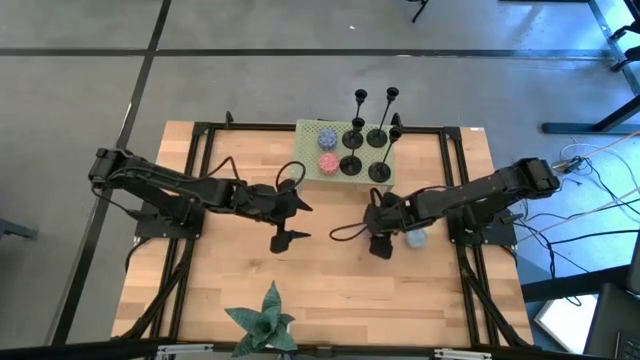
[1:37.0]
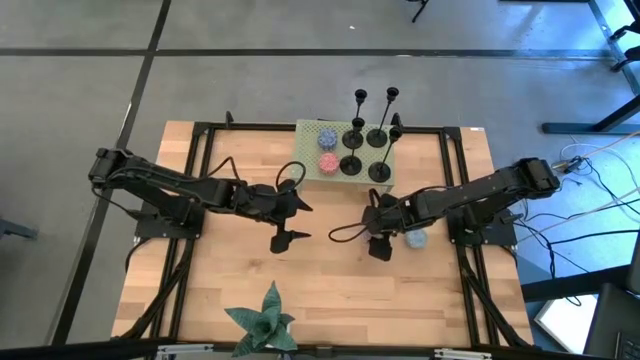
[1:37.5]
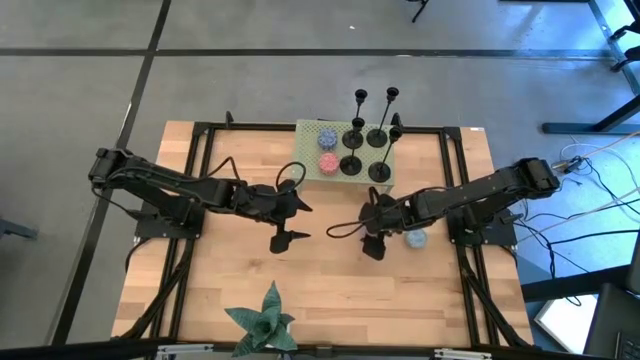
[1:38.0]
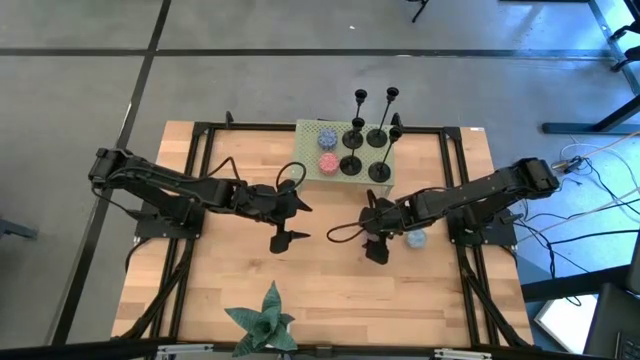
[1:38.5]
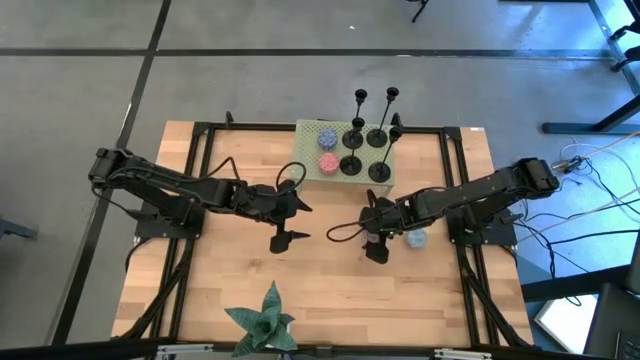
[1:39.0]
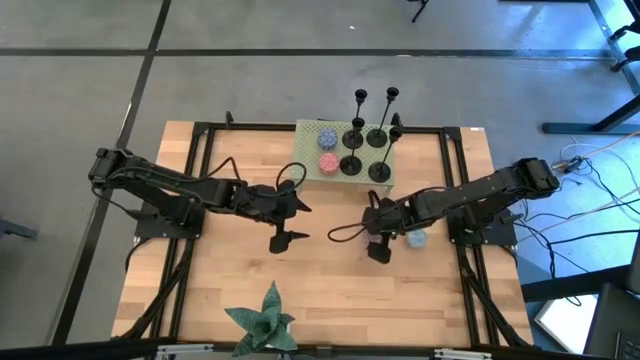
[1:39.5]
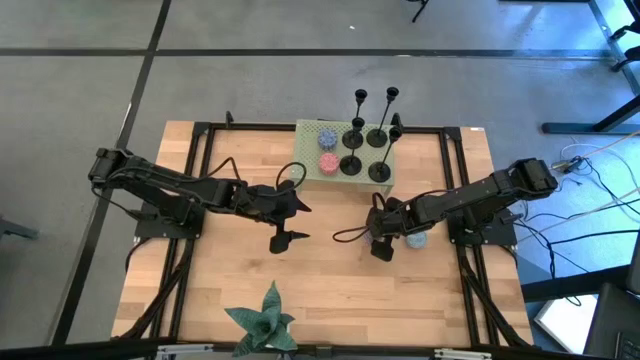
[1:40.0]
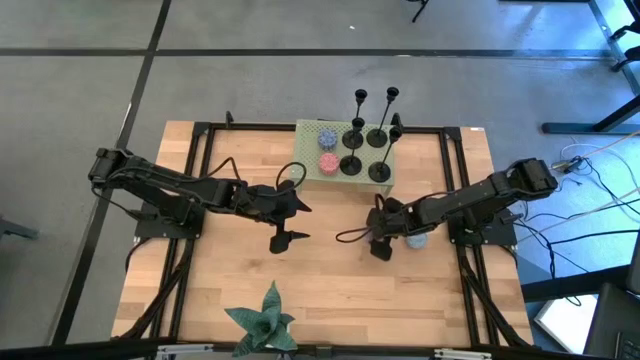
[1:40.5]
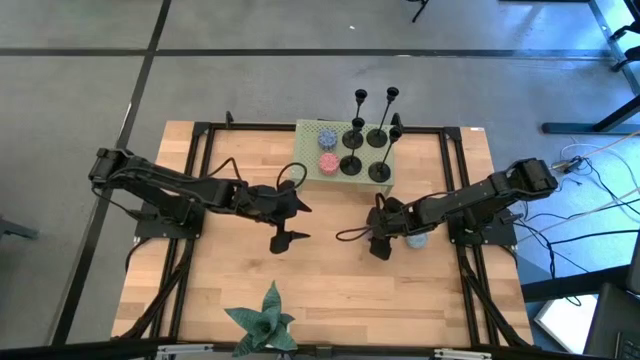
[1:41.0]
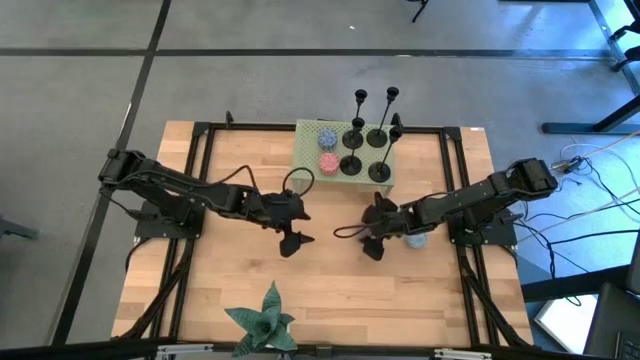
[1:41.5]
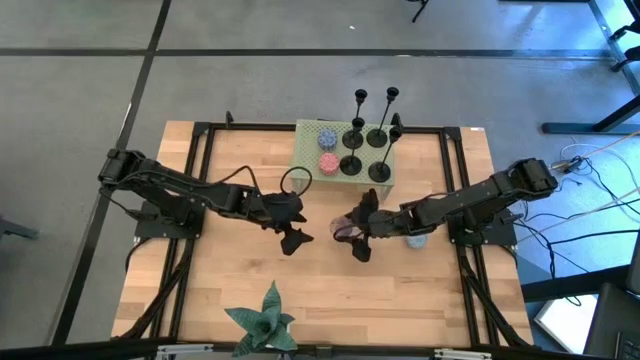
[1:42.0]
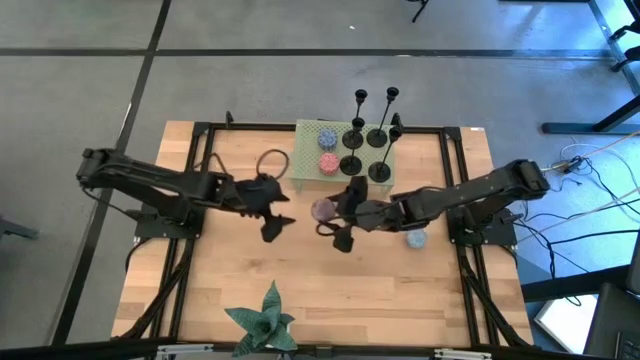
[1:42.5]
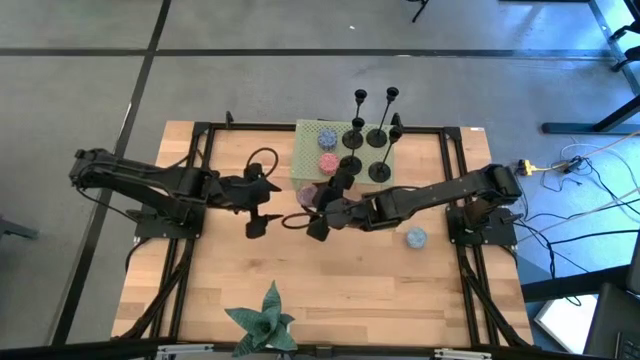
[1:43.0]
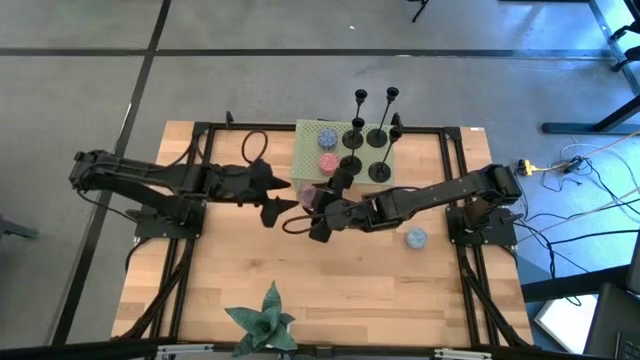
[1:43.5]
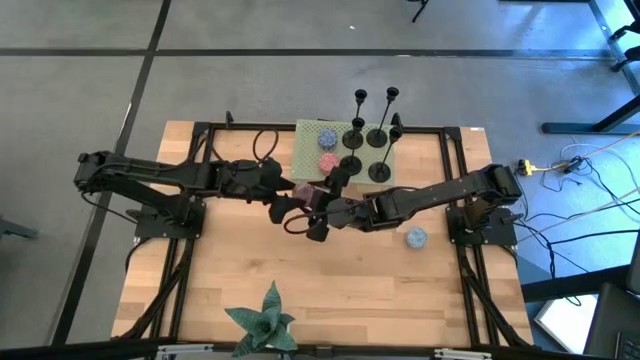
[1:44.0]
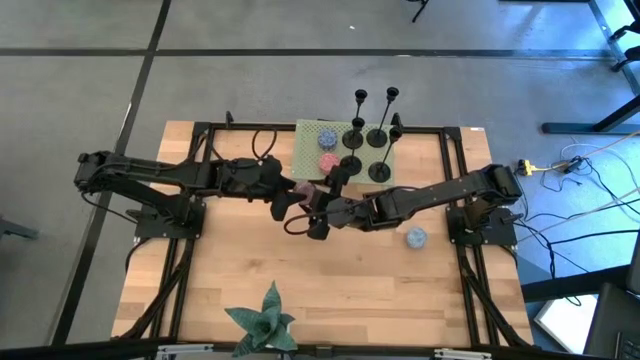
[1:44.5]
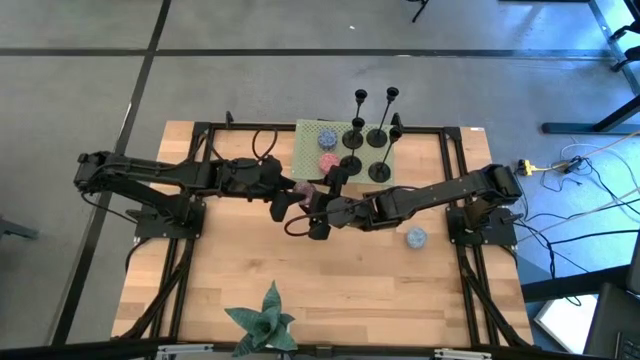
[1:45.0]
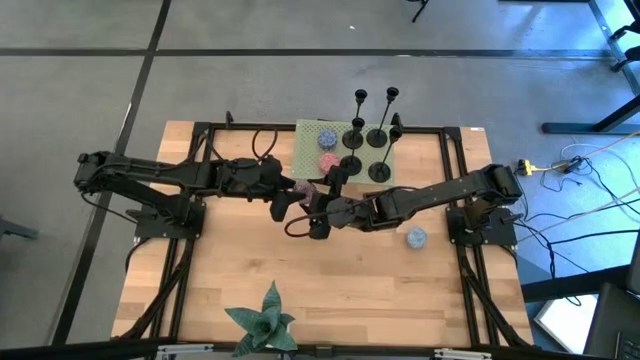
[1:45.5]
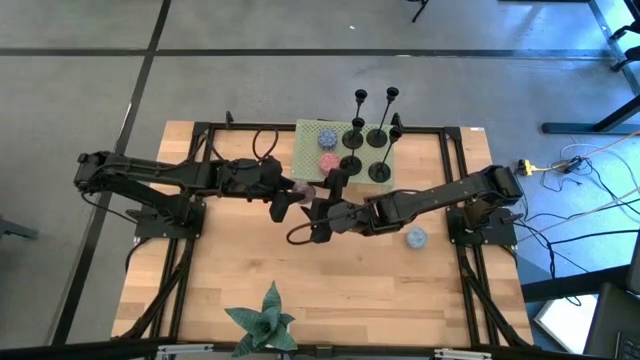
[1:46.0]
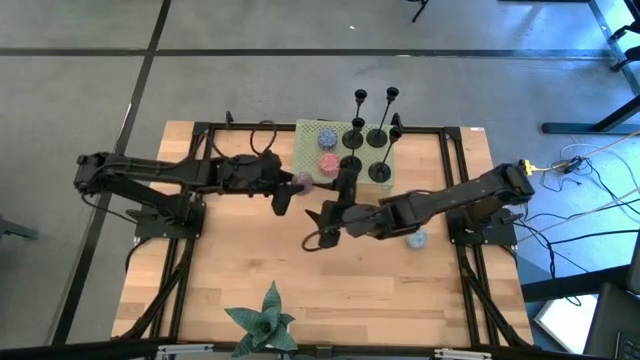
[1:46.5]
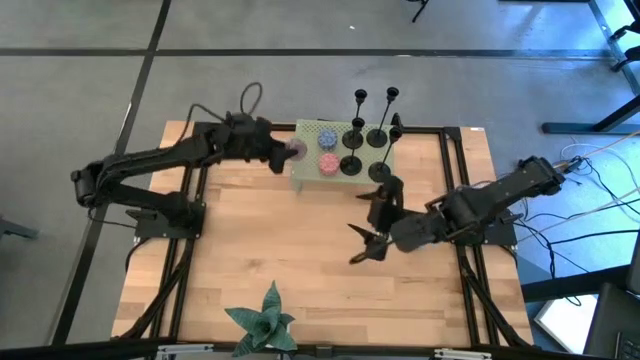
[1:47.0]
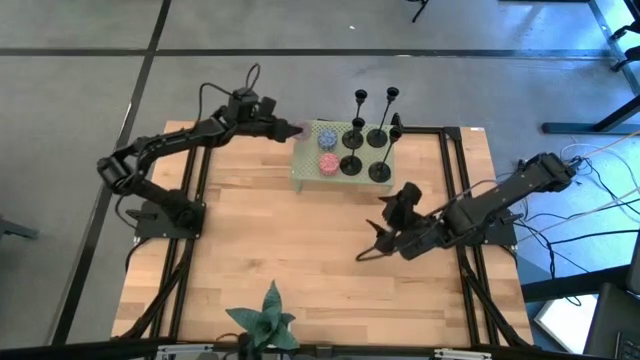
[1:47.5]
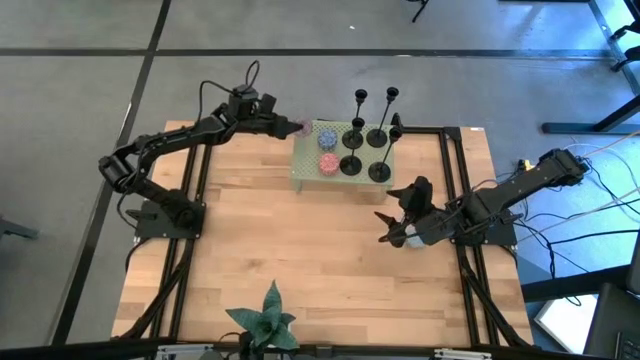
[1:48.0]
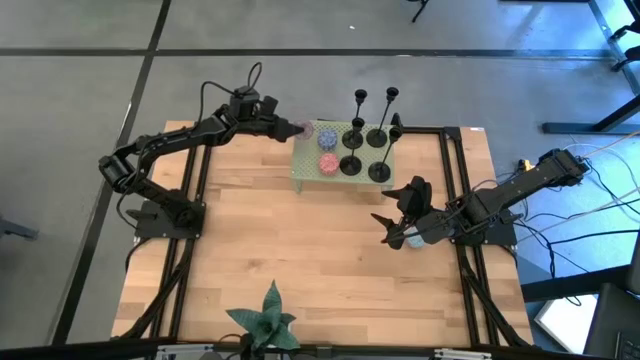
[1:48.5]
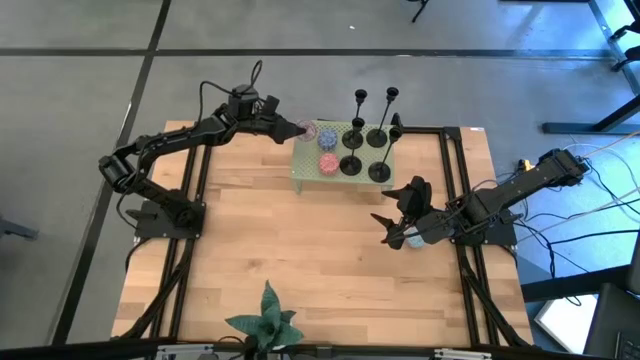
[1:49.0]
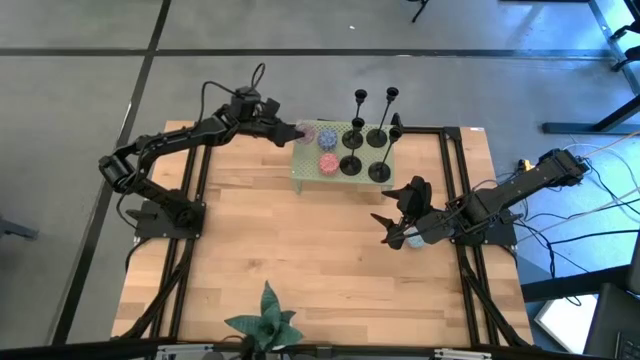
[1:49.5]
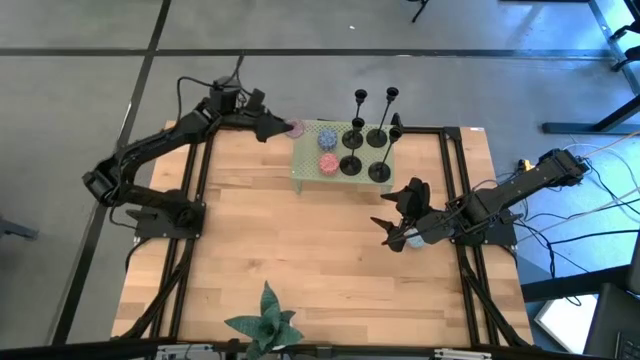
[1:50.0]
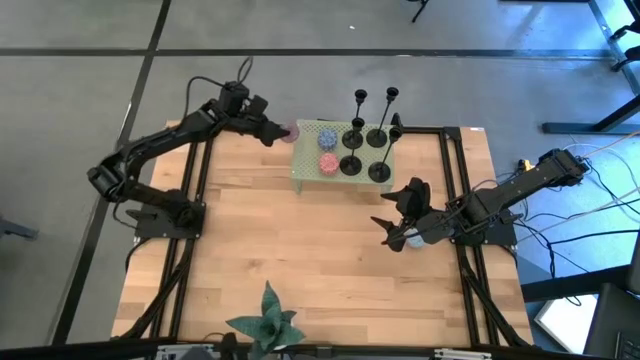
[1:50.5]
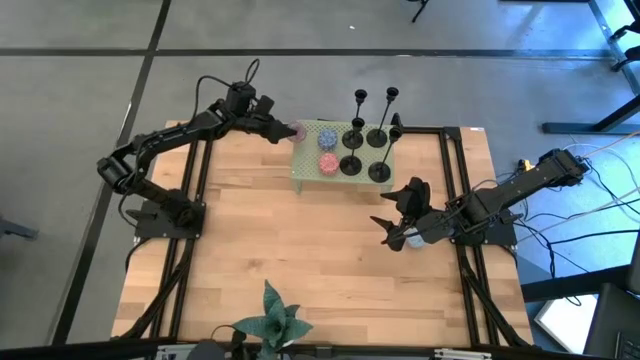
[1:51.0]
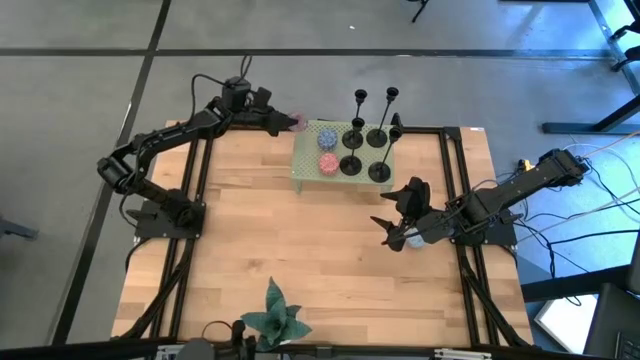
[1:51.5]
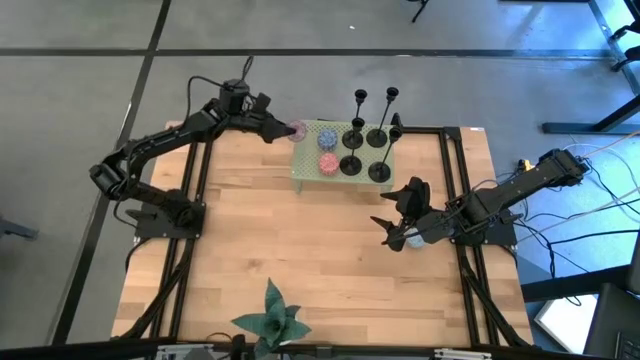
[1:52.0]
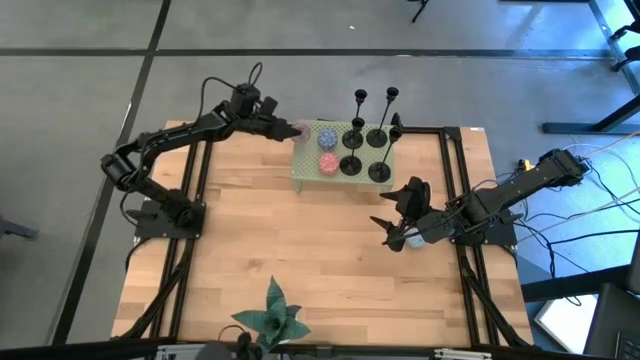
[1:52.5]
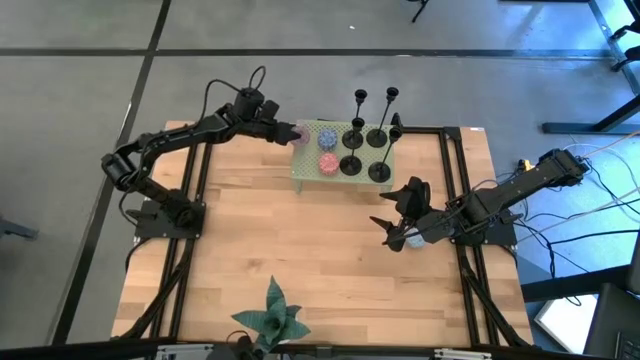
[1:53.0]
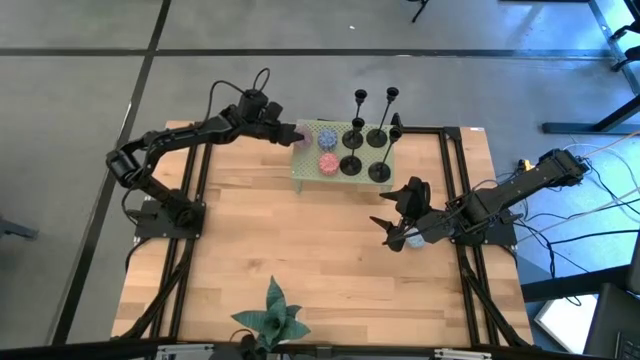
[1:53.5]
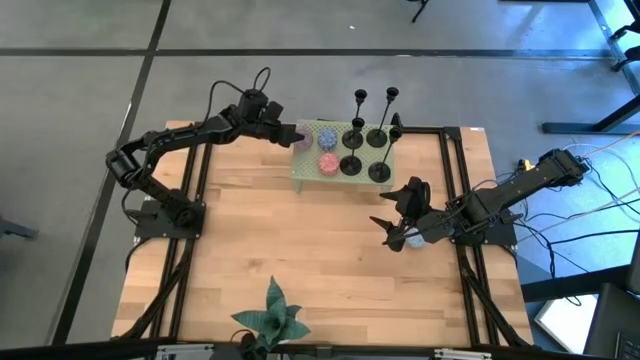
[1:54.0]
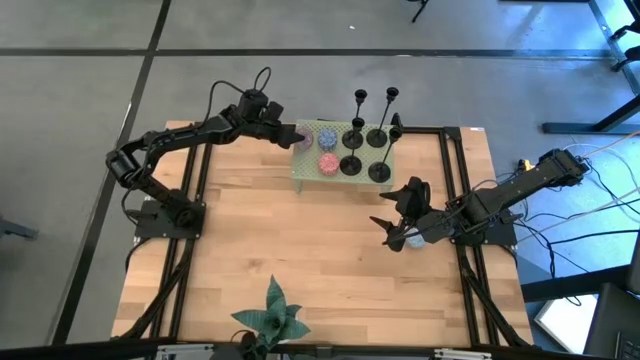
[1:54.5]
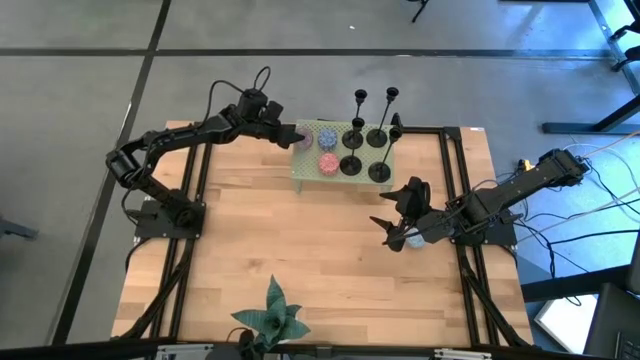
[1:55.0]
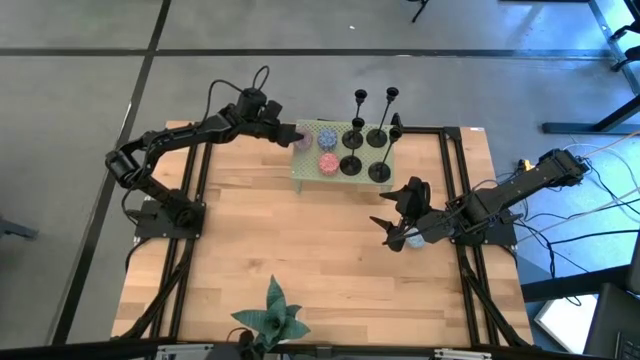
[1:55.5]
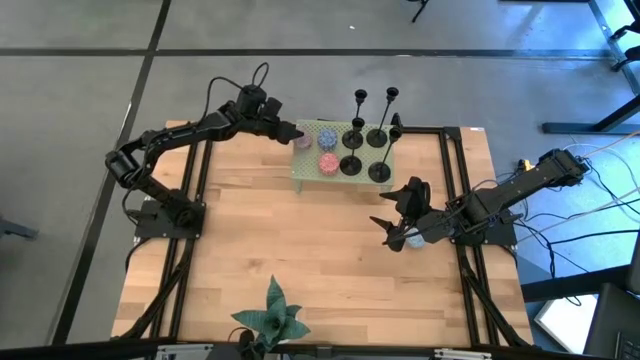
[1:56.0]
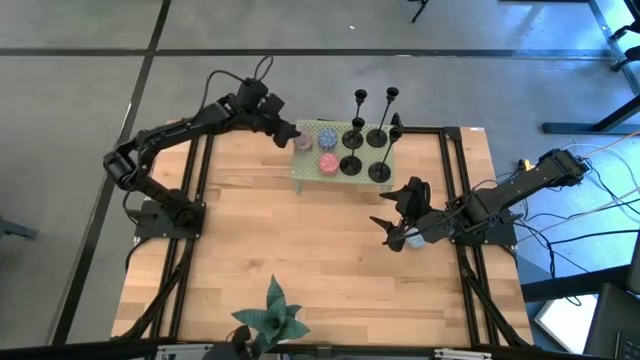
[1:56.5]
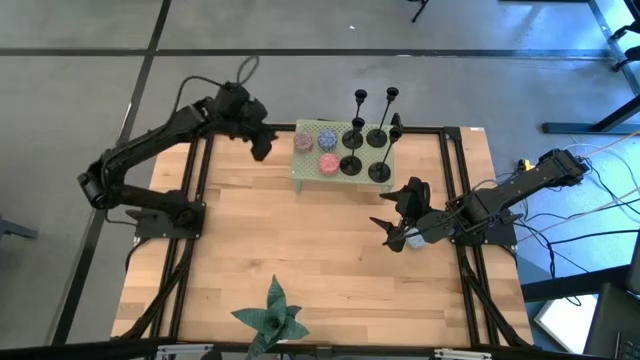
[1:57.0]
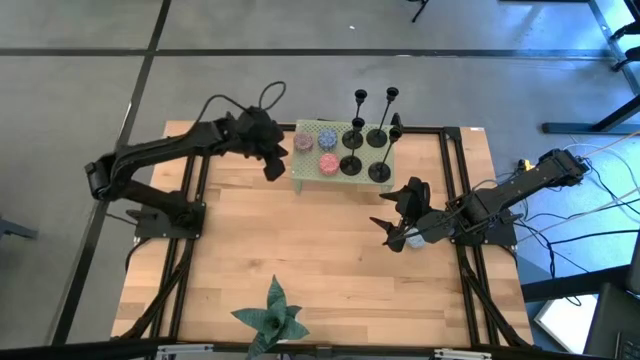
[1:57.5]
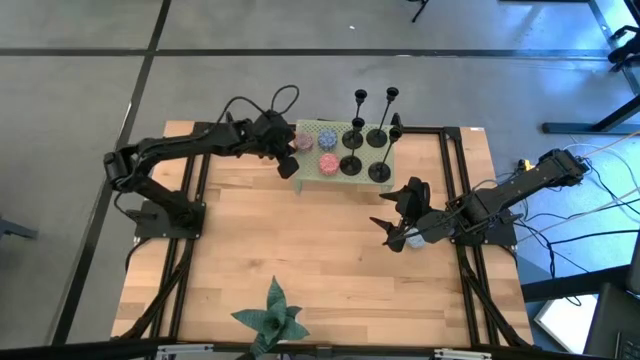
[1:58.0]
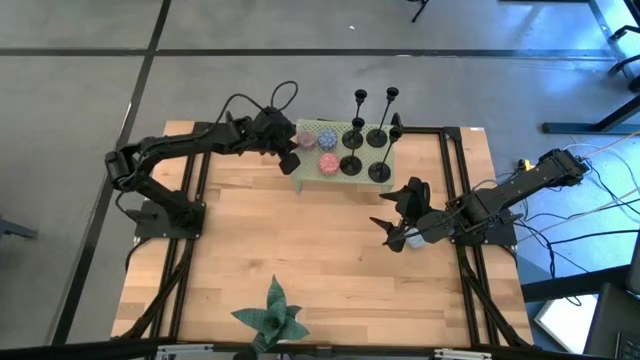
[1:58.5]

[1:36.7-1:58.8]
Task: Pick & Place candle stick holders
Put the brown scented candle on the shelf
